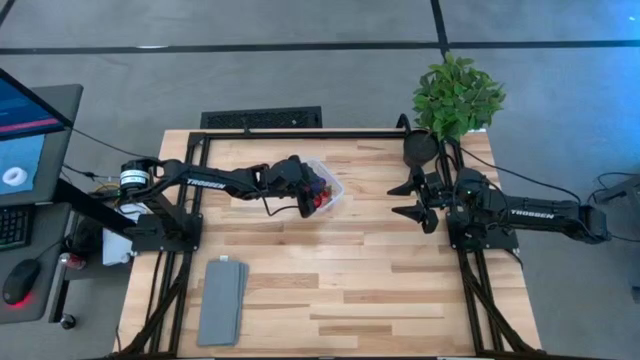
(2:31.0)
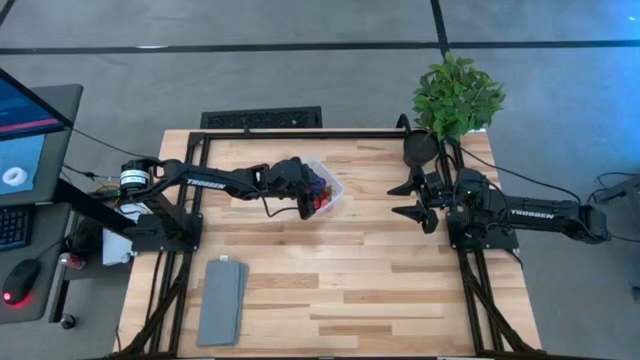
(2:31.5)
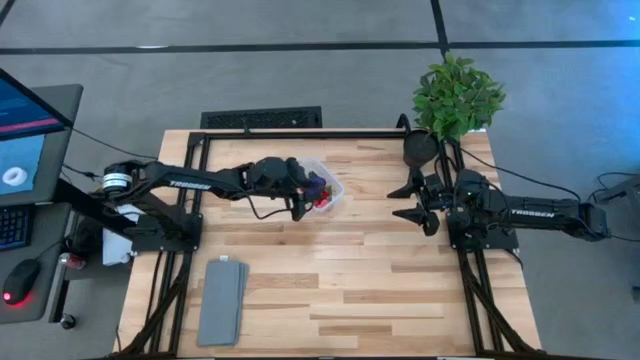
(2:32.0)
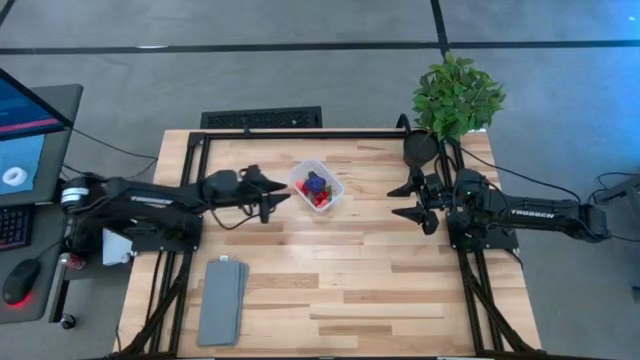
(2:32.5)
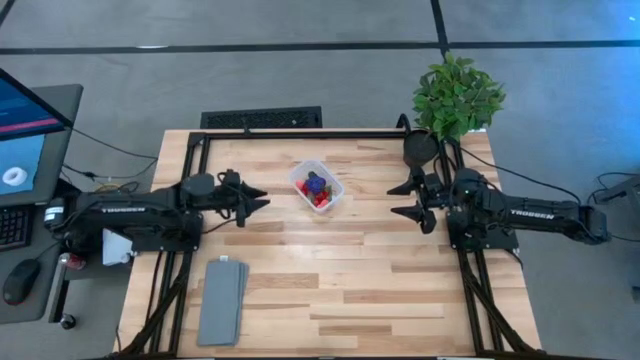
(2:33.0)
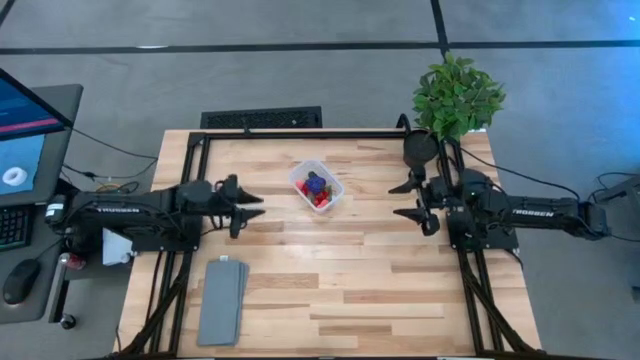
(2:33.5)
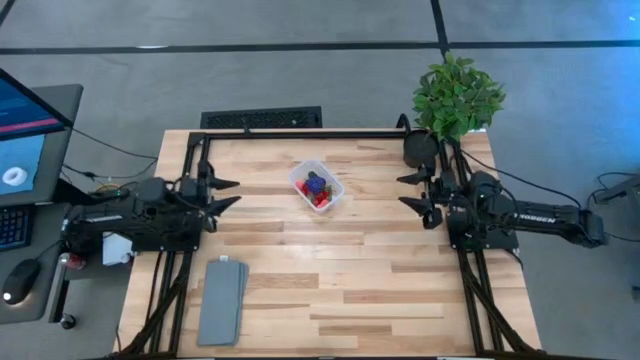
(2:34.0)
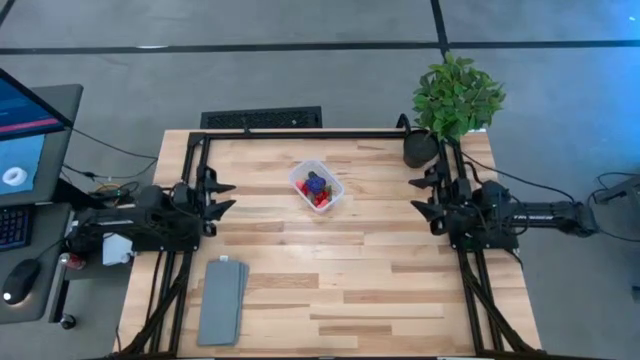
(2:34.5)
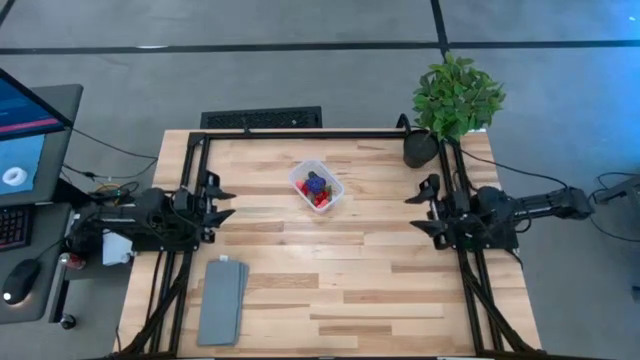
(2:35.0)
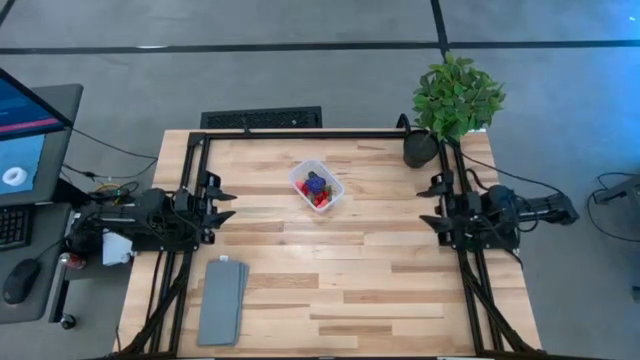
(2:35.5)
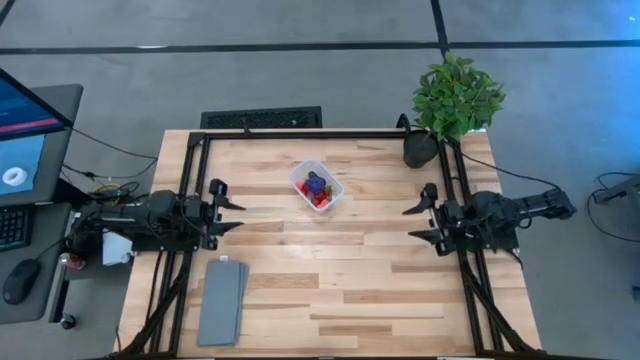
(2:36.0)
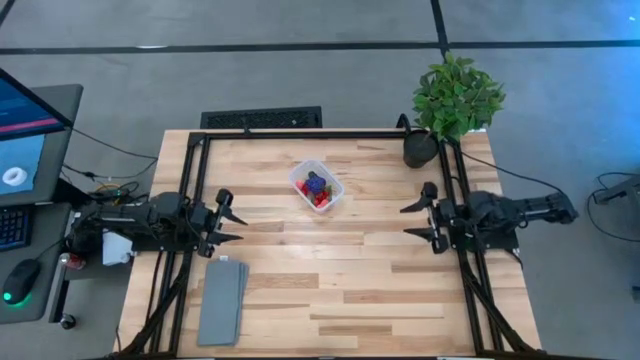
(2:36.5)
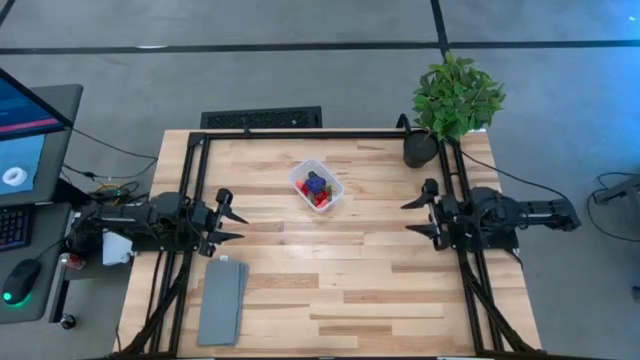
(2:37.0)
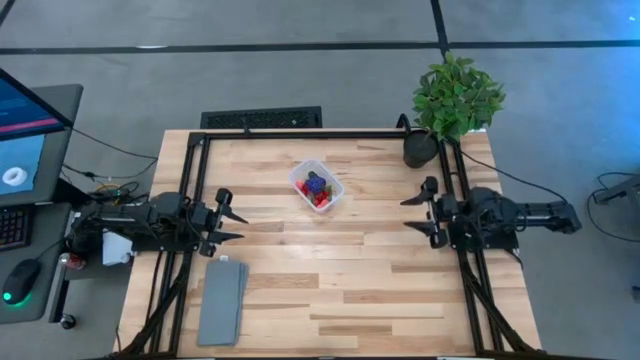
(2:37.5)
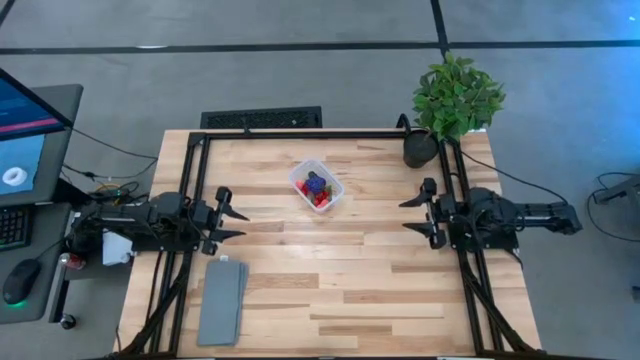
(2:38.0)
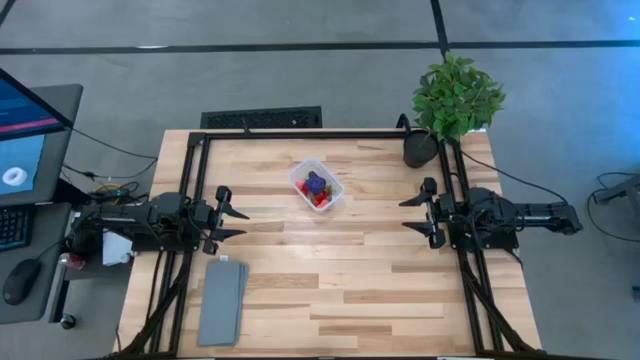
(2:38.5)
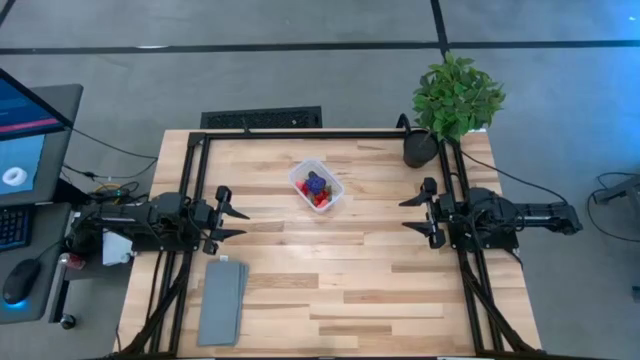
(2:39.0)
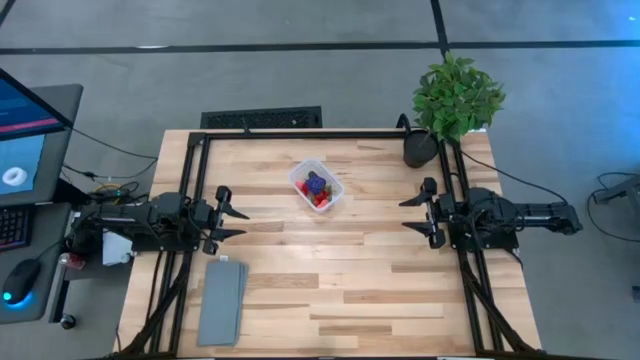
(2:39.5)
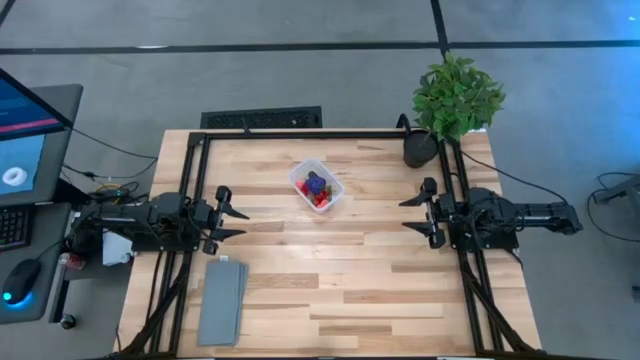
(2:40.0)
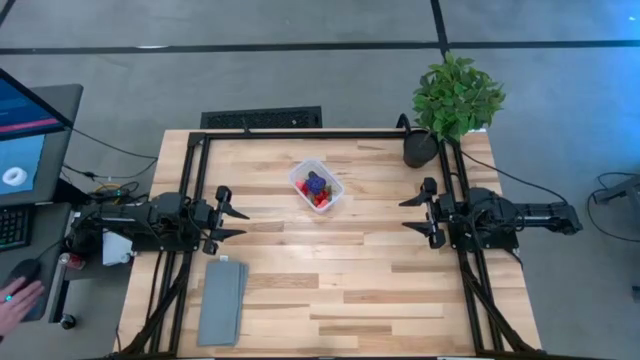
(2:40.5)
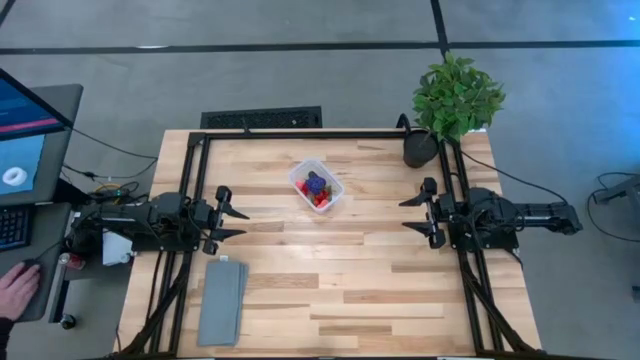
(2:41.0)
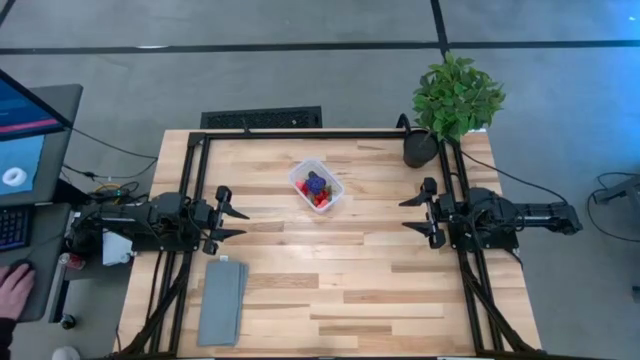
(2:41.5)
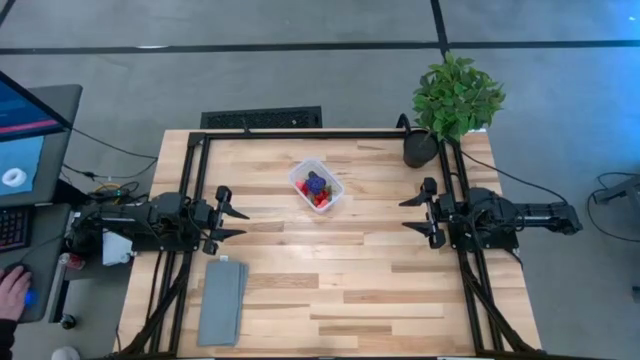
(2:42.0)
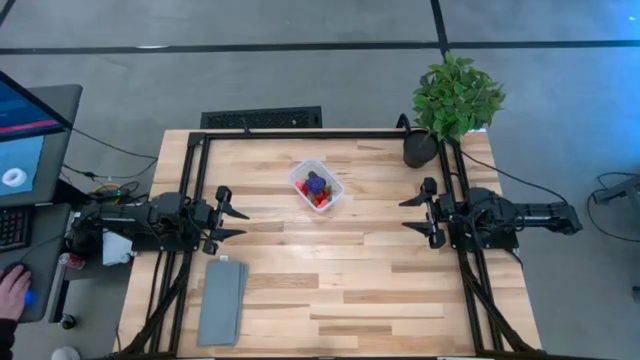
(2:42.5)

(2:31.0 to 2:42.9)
Task: Pick and placing Produce into tupperware
Return to Home Position

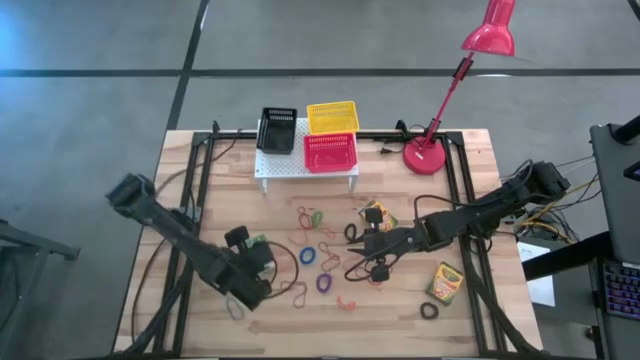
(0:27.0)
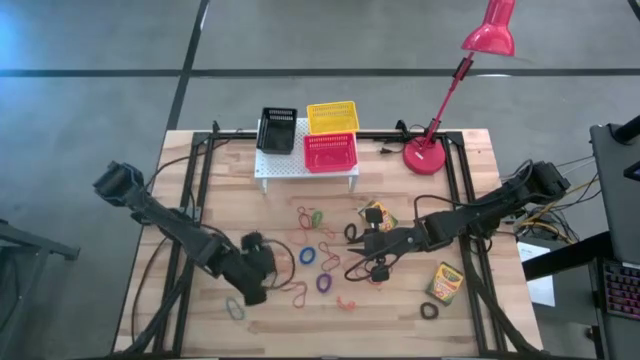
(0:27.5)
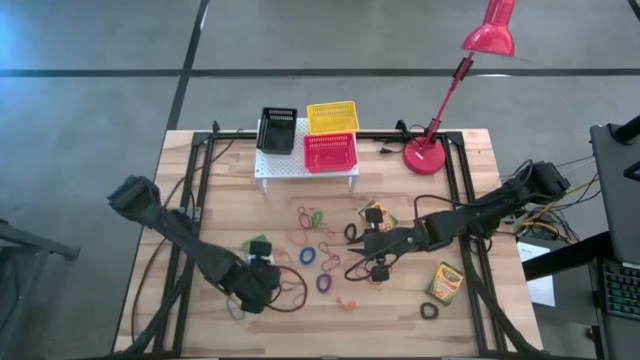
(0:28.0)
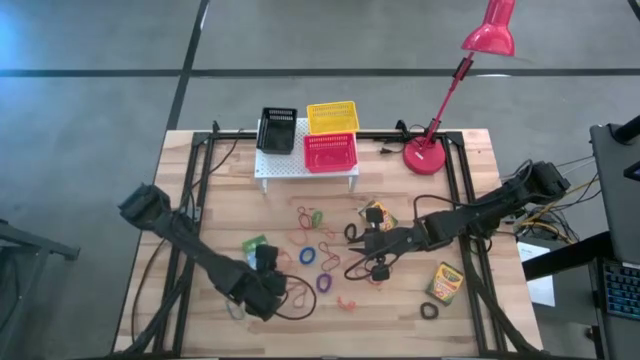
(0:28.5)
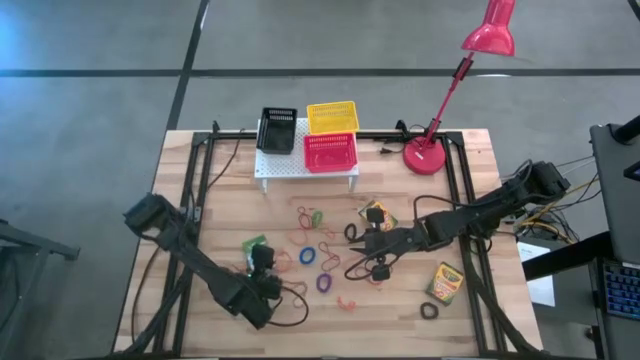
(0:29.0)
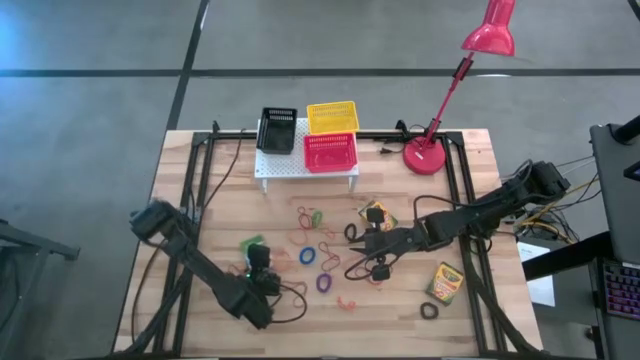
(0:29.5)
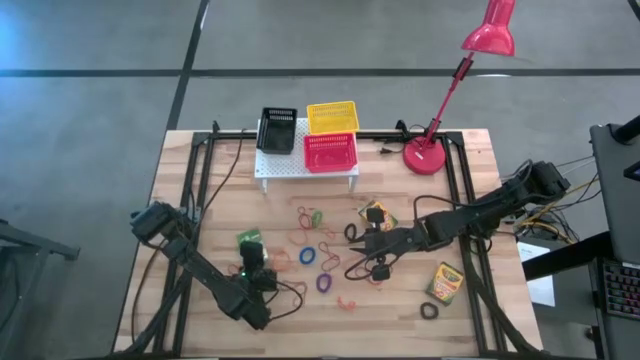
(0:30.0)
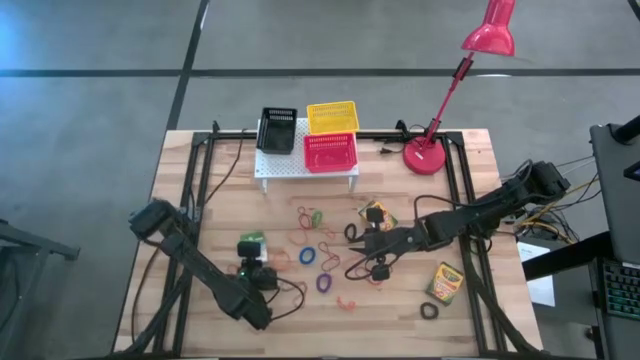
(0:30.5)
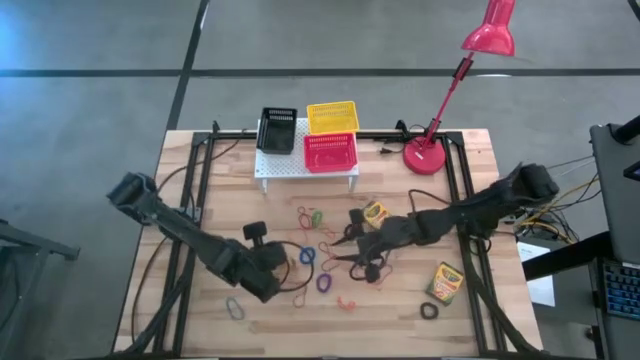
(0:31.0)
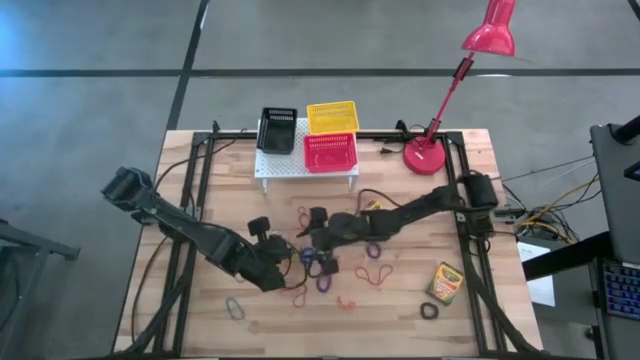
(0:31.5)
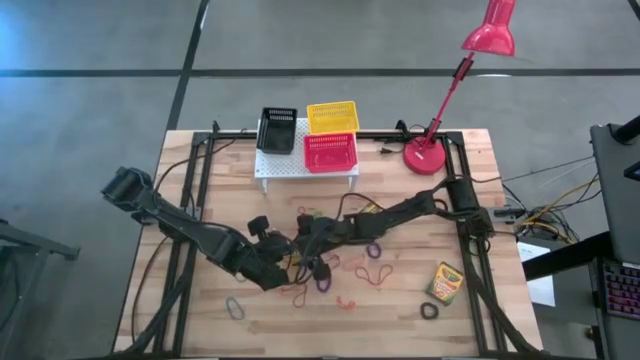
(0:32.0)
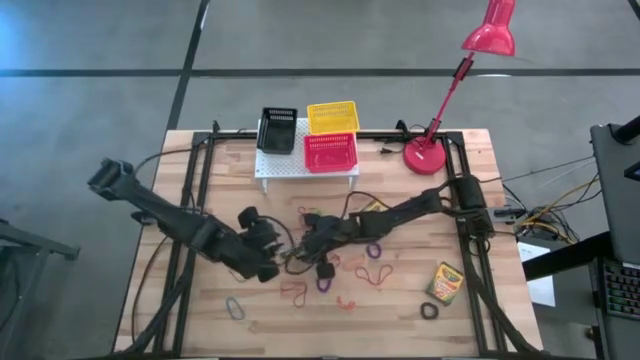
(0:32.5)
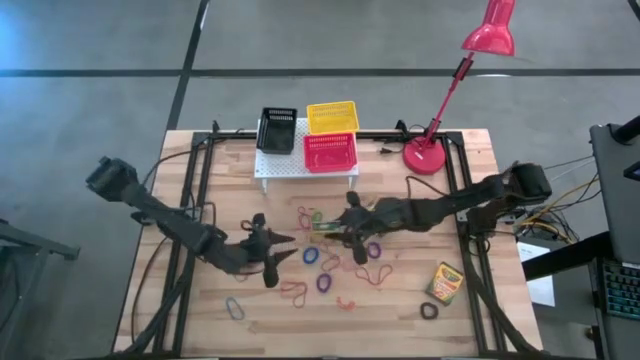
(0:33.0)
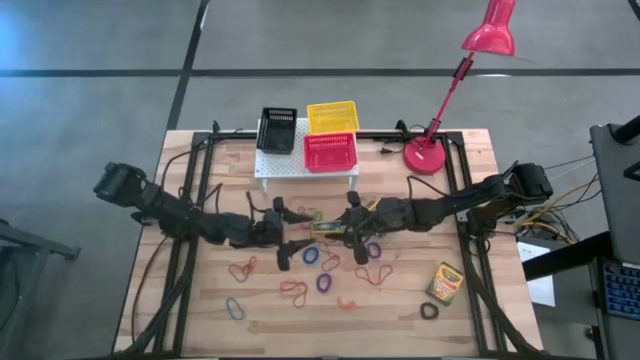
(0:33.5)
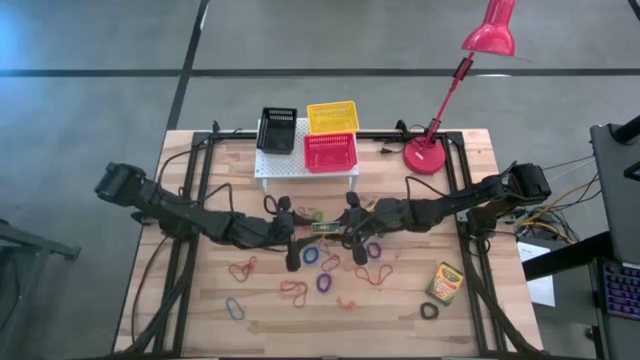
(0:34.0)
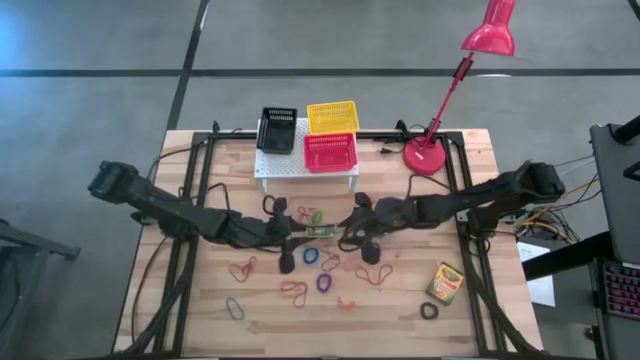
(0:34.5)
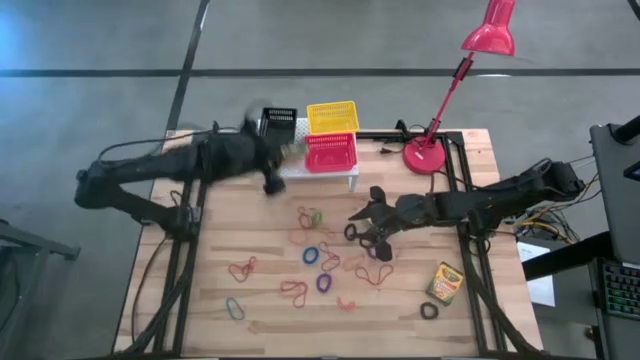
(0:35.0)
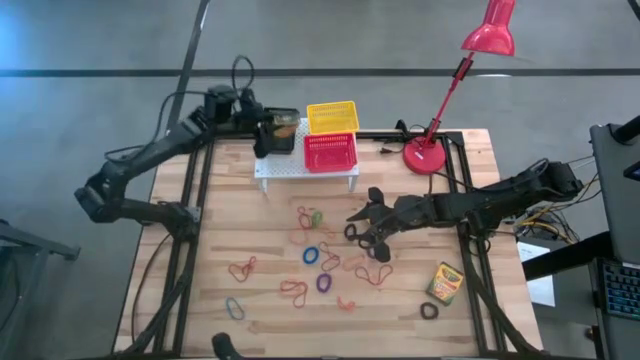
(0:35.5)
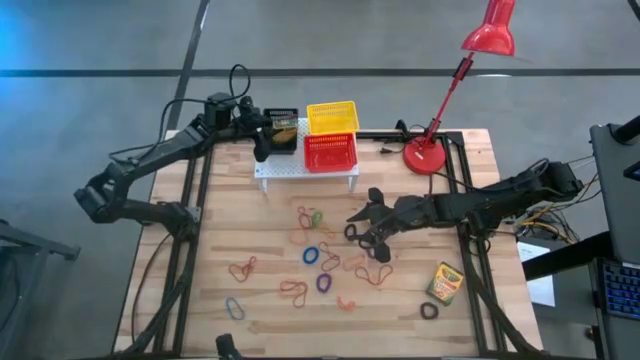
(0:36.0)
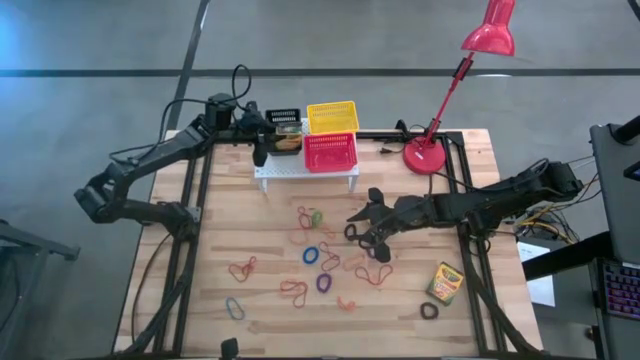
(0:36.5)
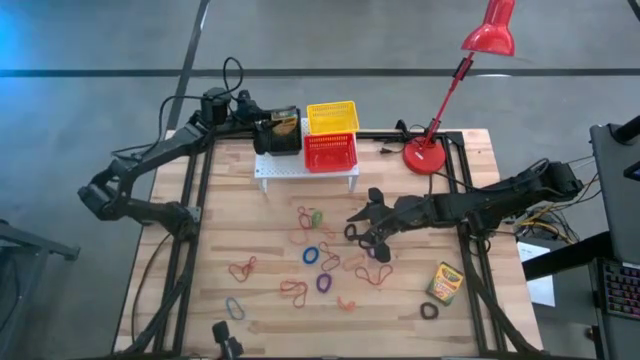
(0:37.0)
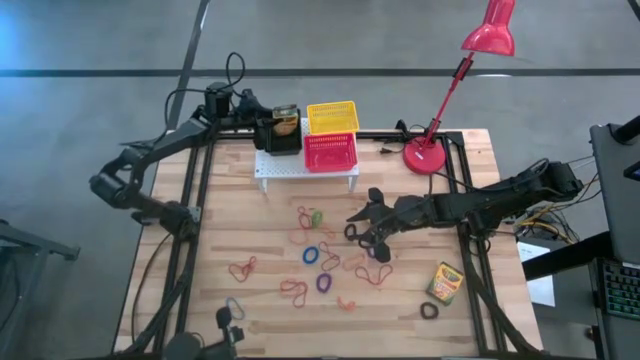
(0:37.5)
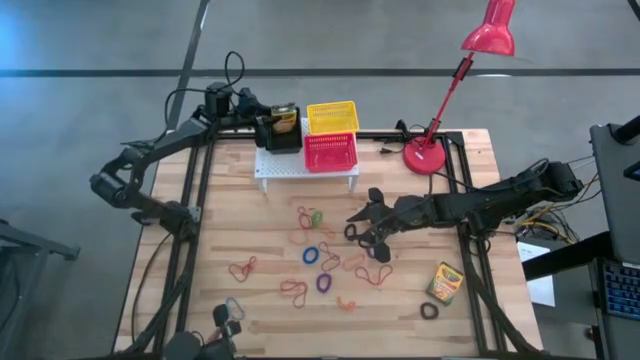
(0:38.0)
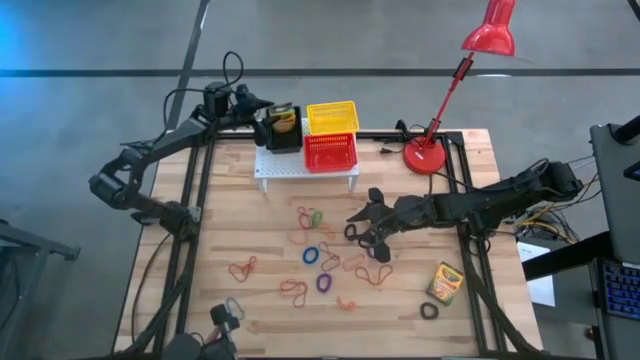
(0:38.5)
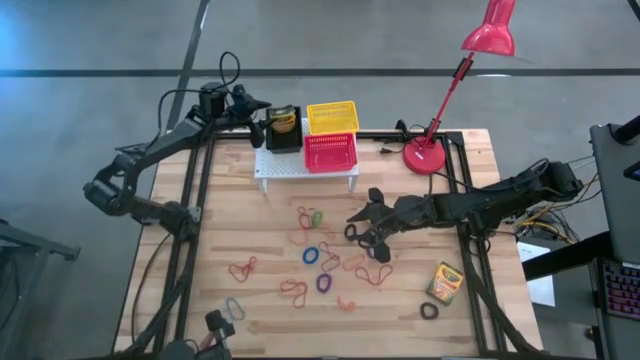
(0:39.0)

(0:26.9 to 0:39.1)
Task: Pick & Place Office Desk Supplies
Put the crayon box into the black bin on the shelf
